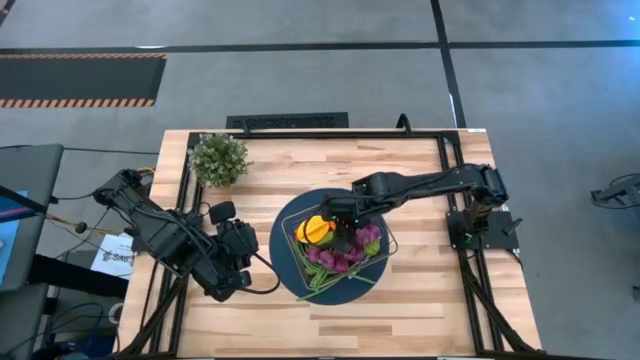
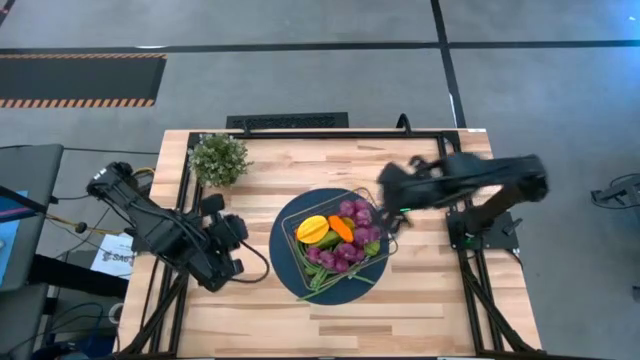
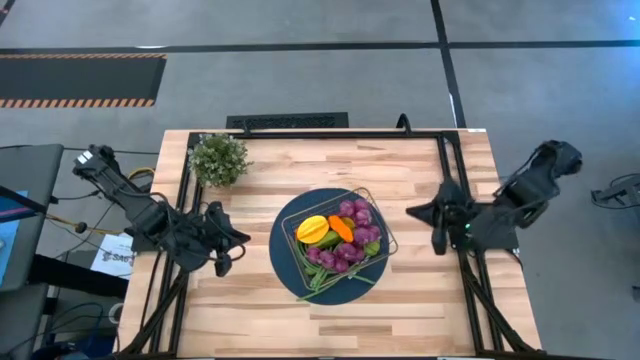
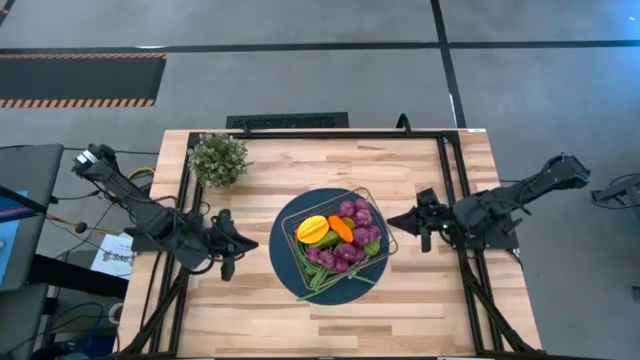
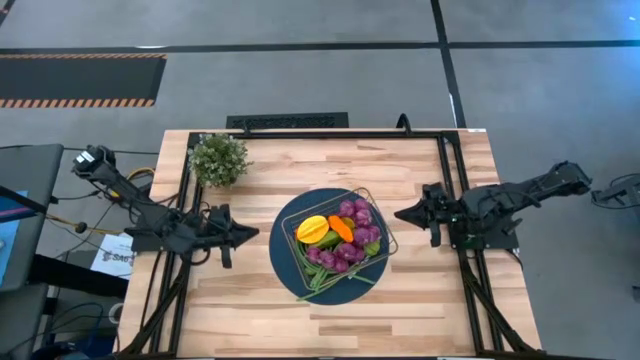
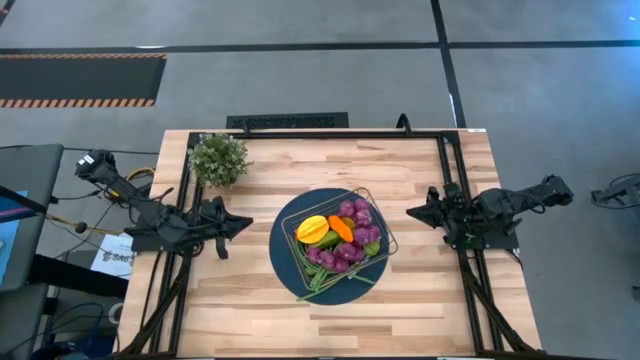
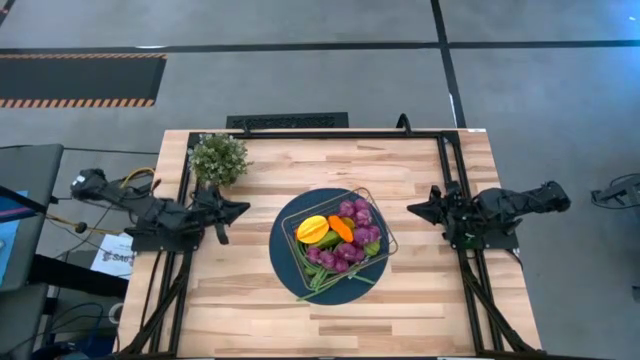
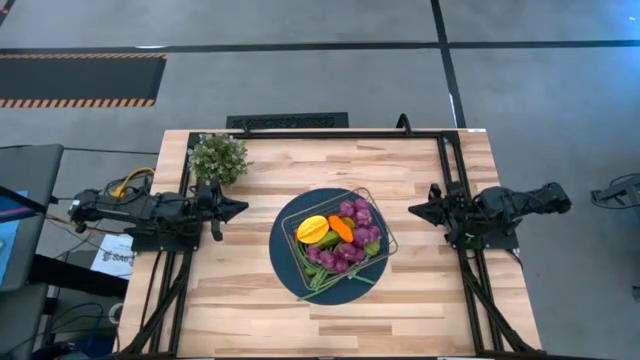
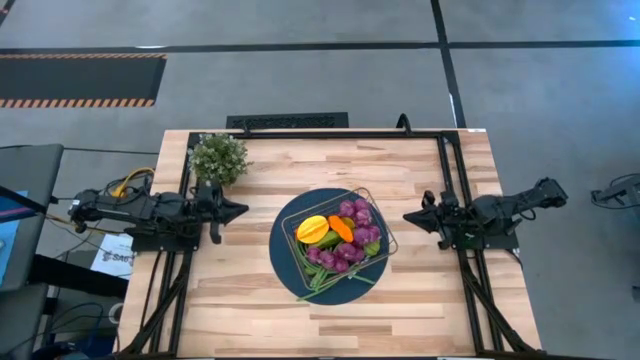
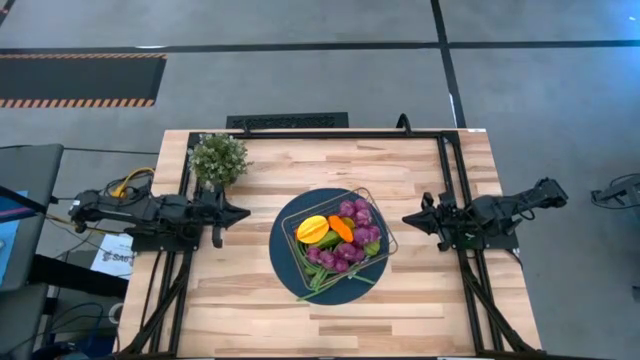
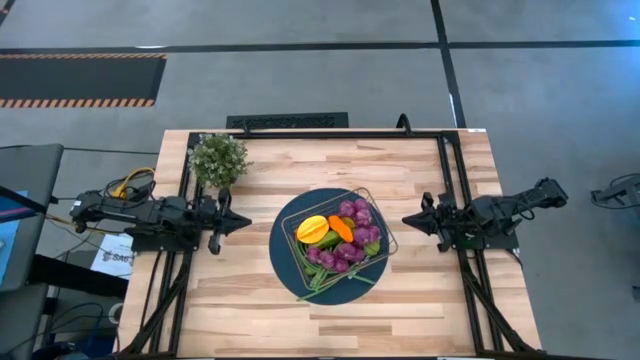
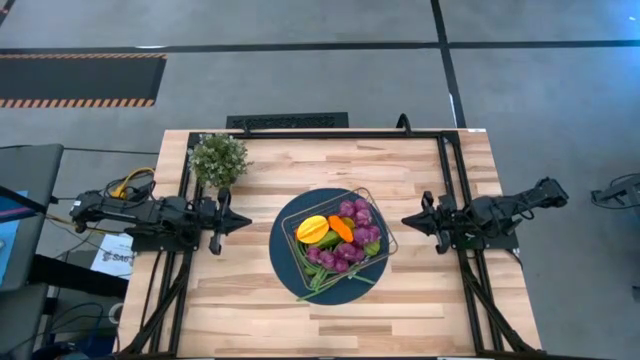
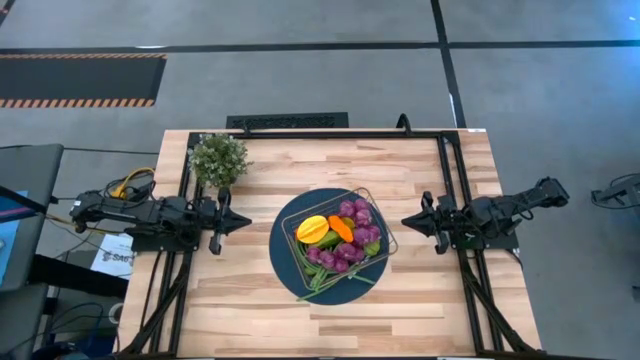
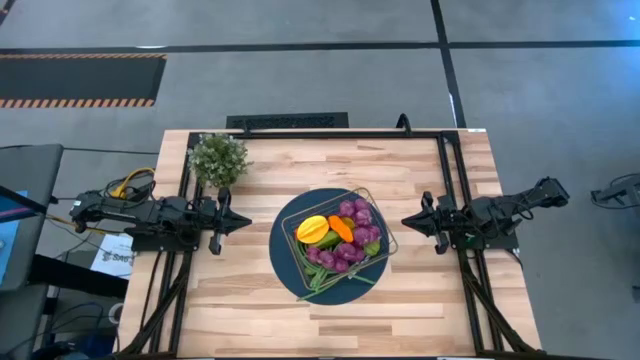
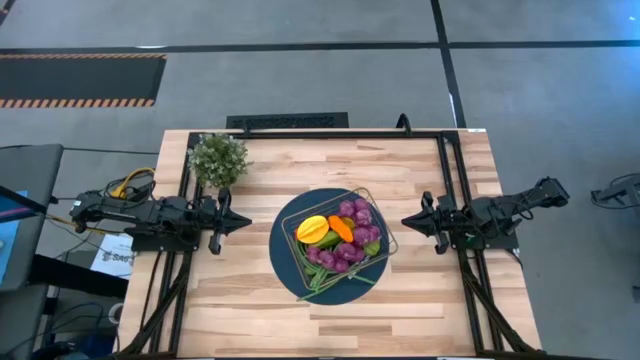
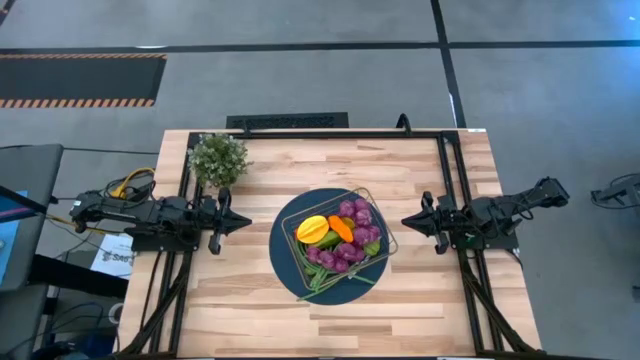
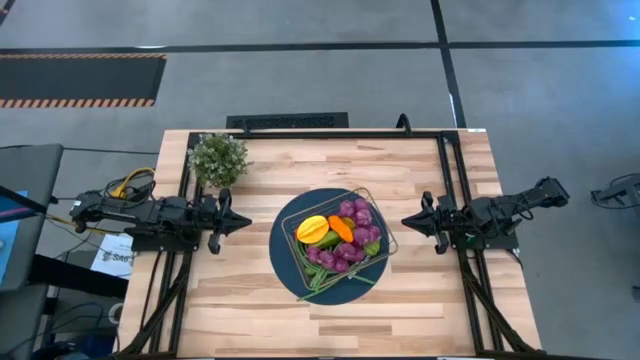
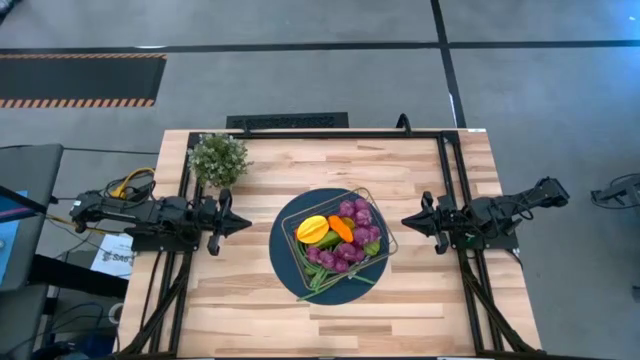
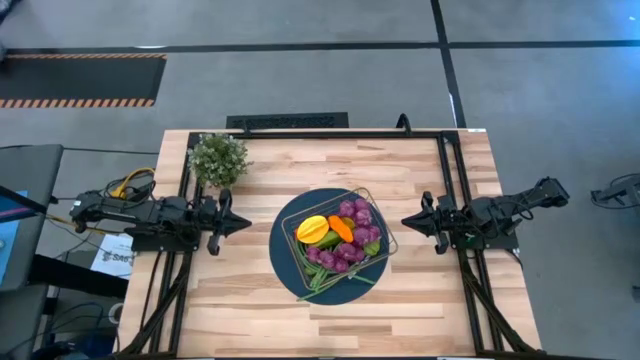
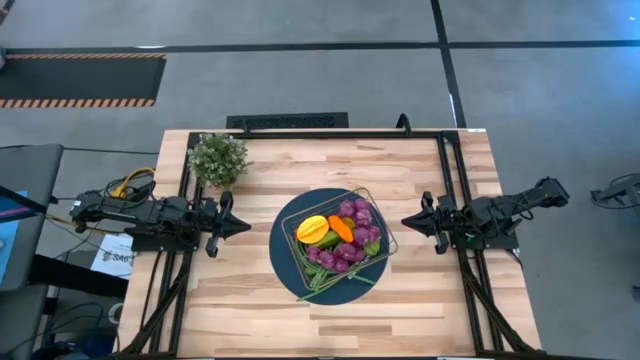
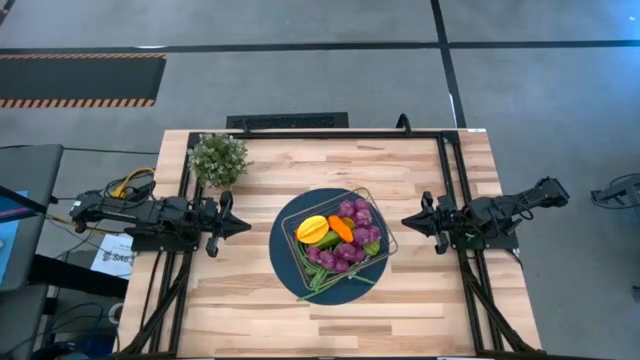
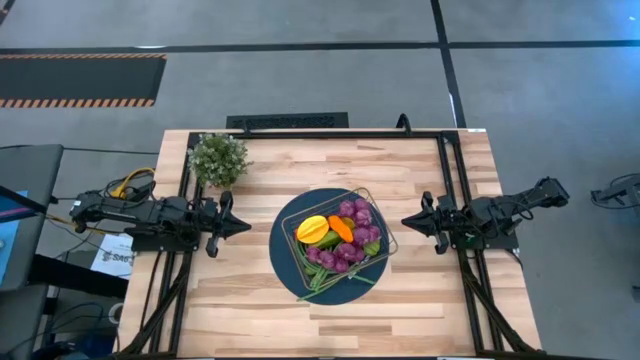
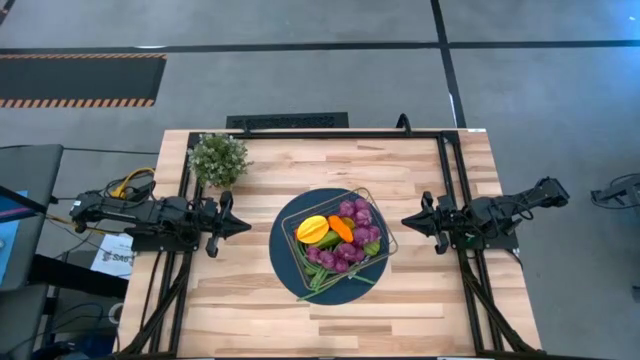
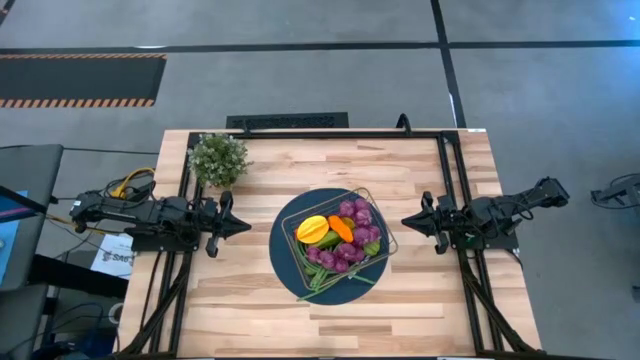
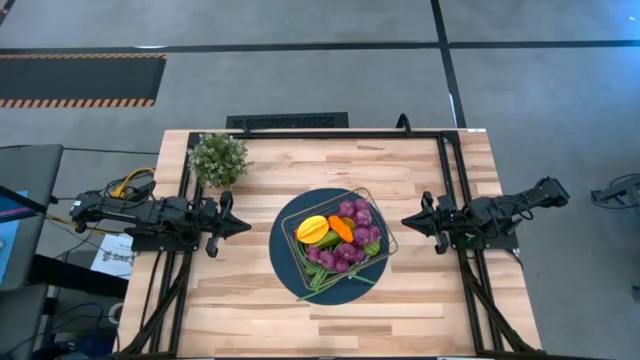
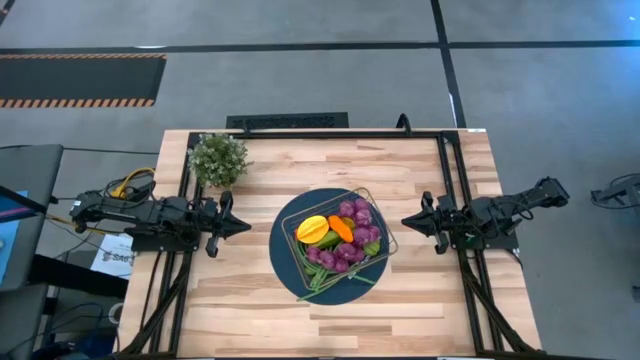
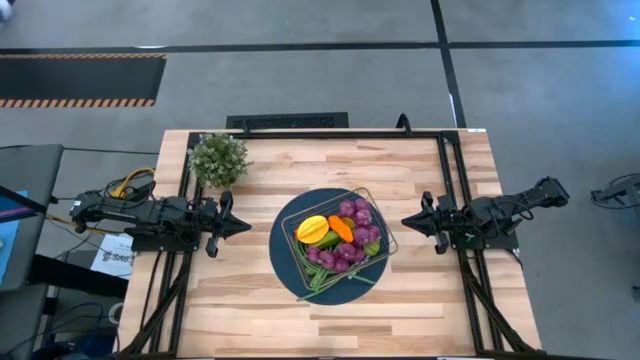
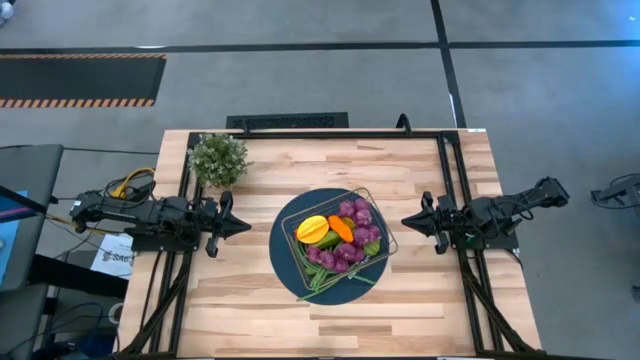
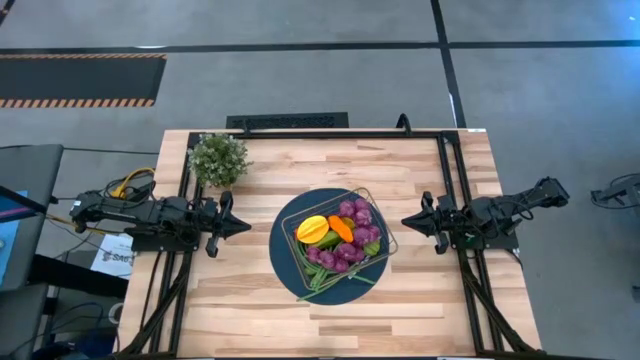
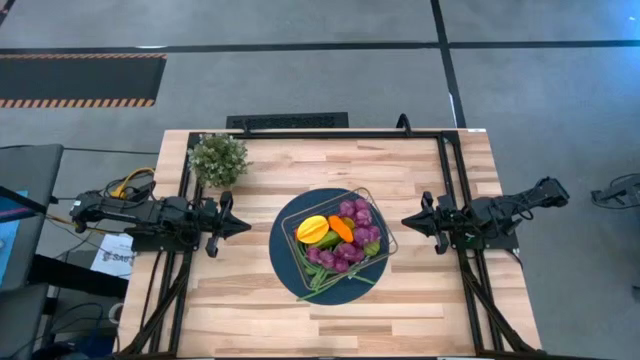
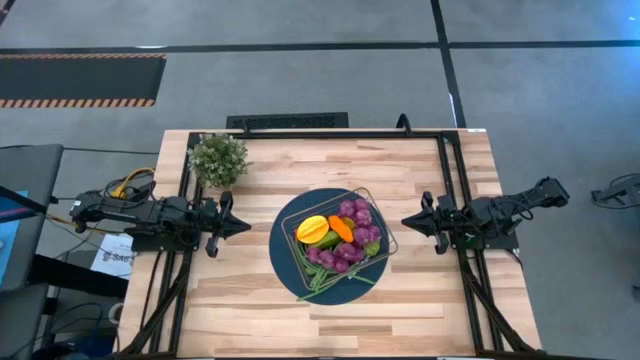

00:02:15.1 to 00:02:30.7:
Task: Build produce basket
Return to Home Position

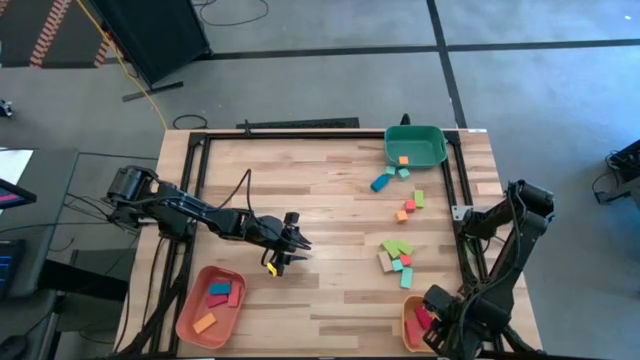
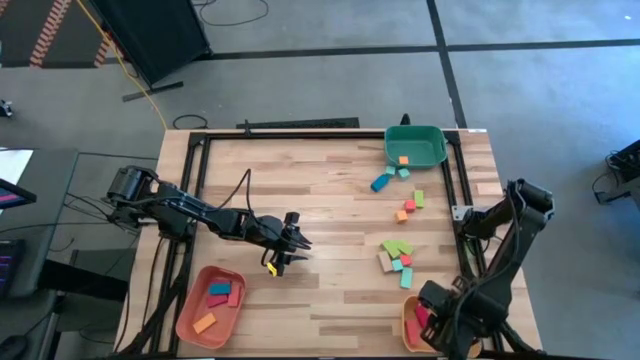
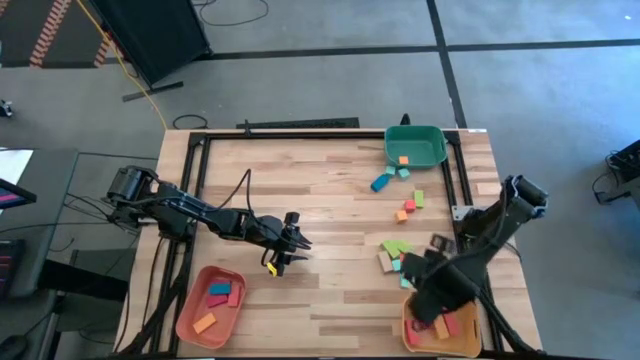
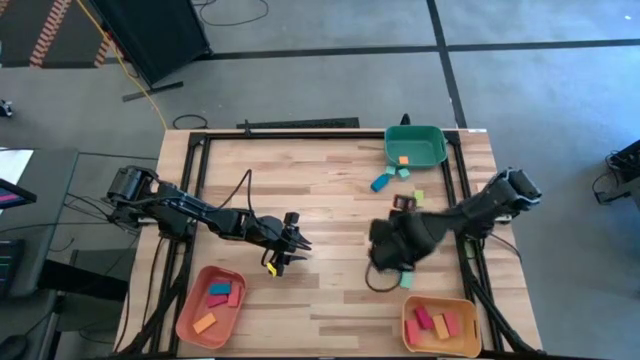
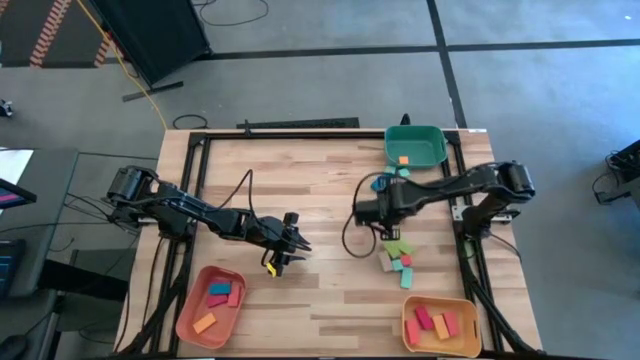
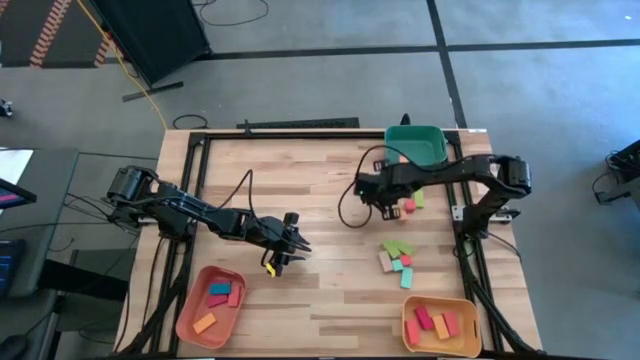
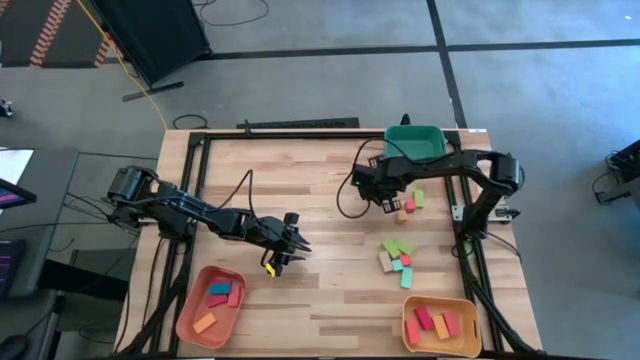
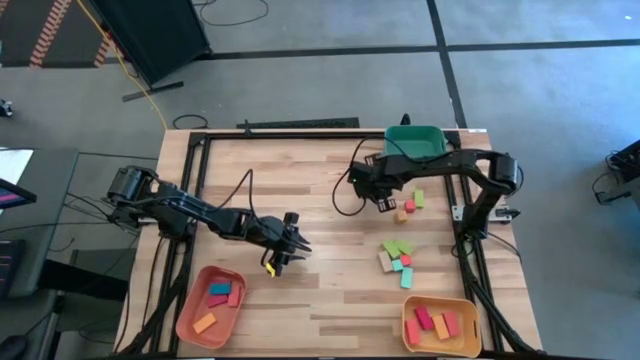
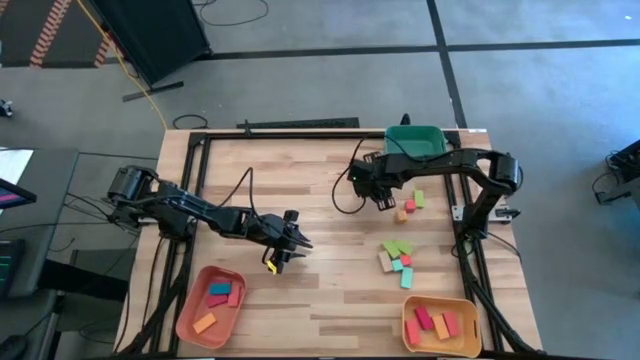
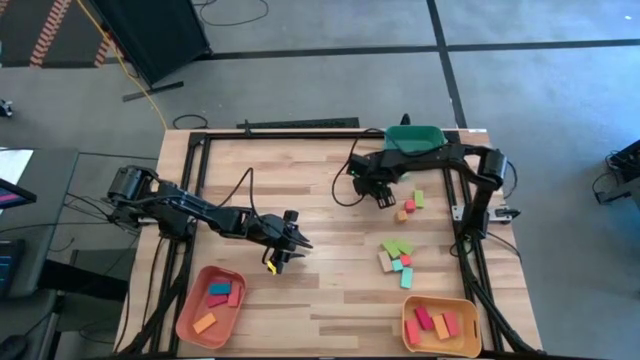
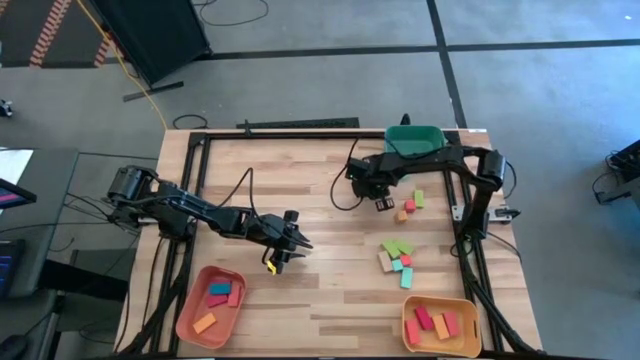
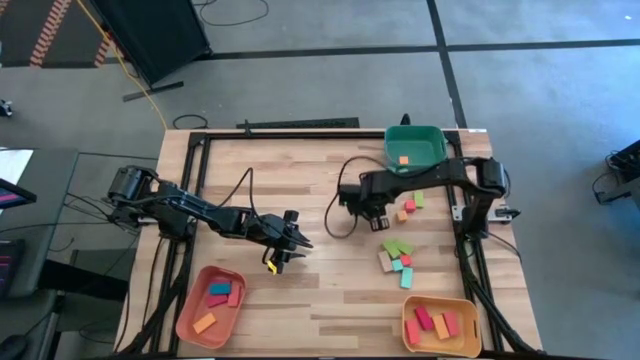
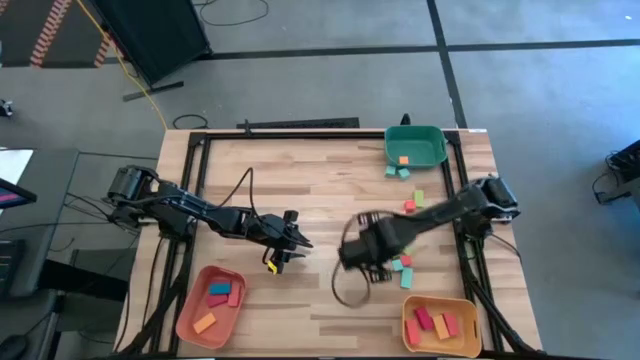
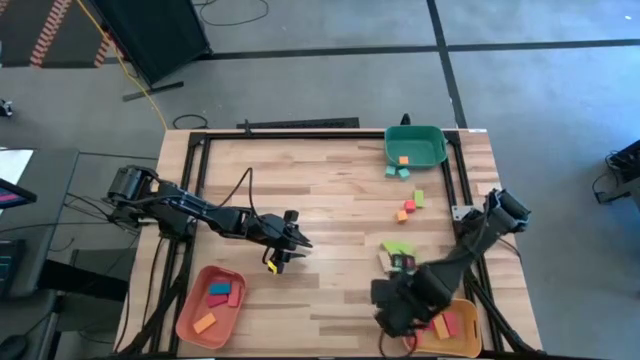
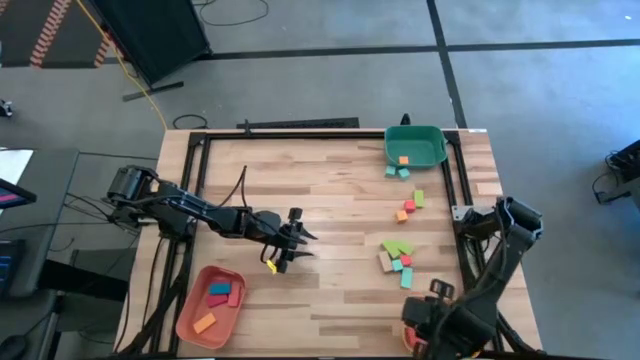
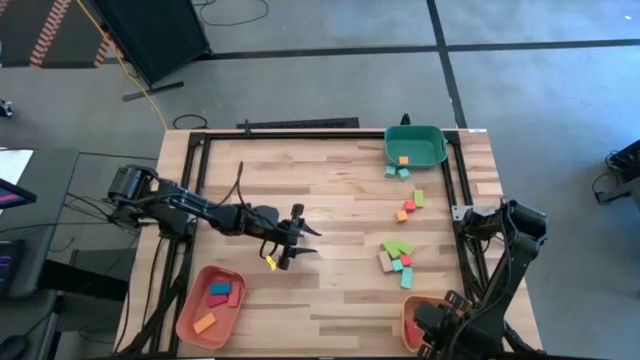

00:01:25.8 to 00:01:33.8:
Task: Sort blocks by size
Put the large blue rectangular block into the yellow bin
